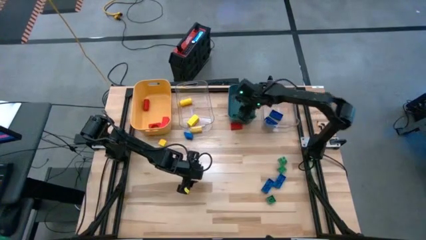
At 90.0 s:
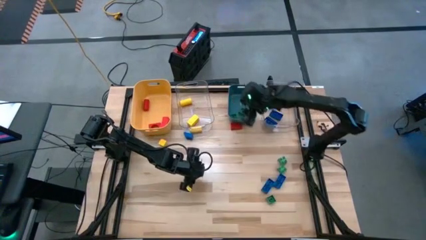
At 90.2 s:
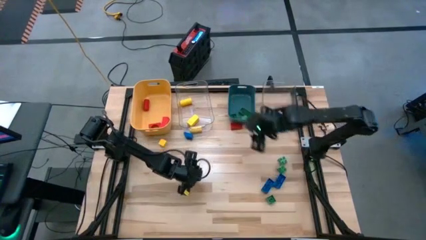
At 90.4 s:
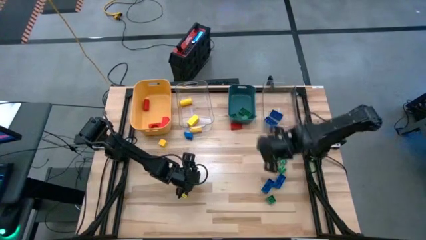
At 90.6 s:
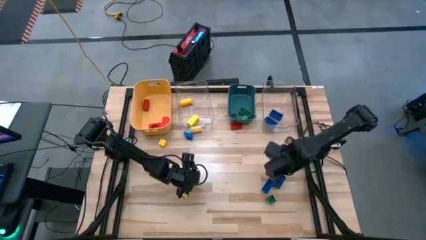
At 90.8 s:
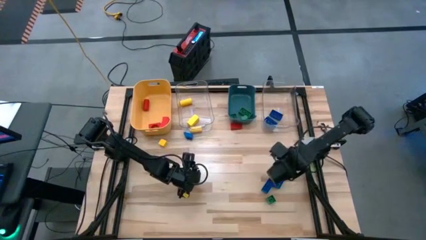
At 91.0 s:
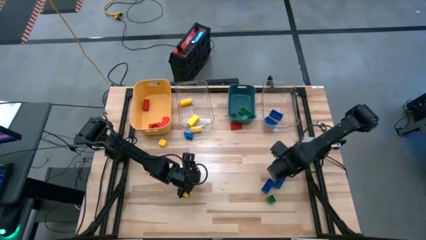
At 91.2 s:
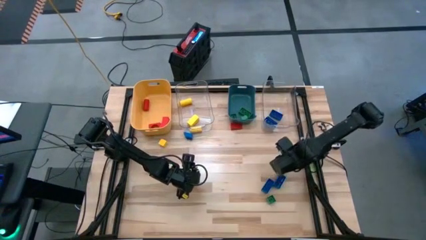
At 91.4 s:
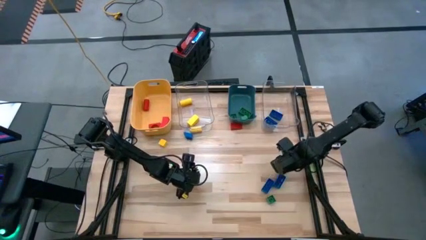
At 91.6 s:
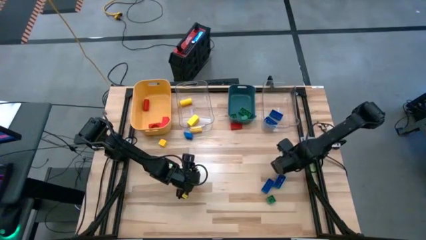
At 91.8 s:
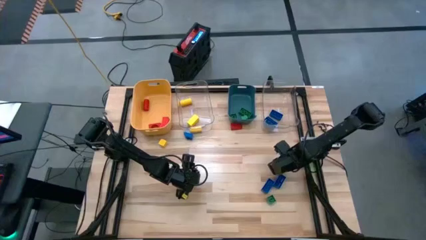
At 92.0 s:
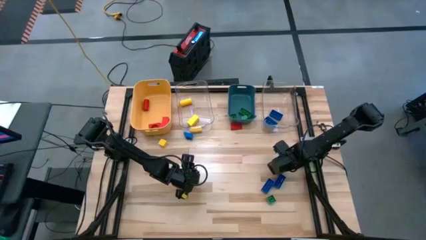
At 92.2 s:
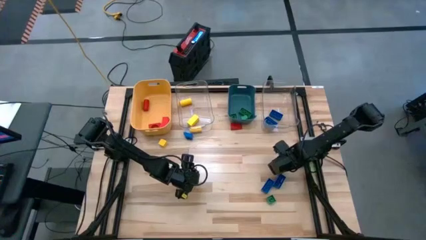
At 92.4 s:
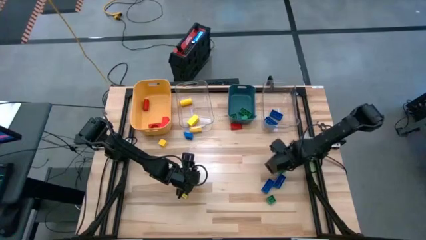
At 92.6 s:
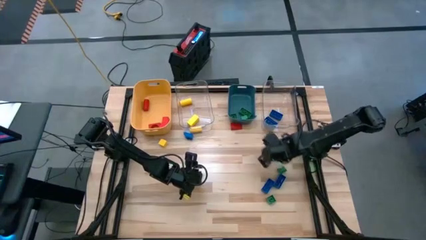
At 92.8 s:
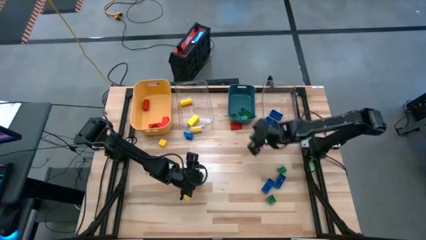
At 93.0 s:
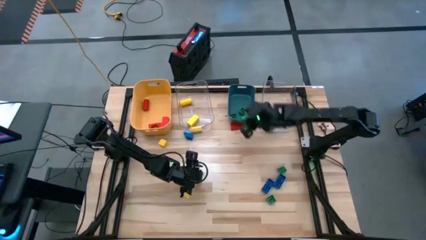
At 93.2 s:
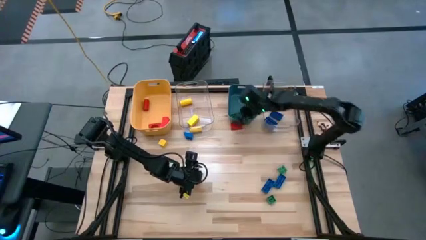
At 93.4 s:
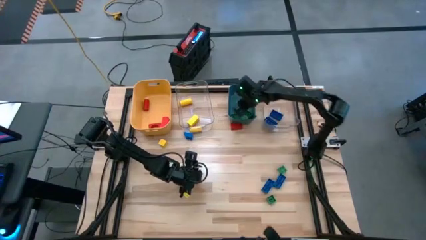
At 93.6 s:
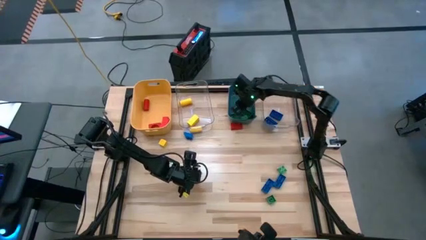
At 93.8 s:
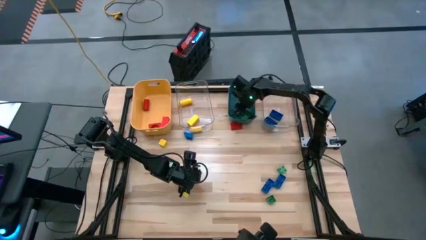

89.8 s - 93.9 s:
Task: Sort blocks
Put the green game piece into the blue bin

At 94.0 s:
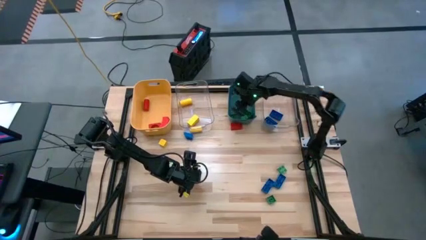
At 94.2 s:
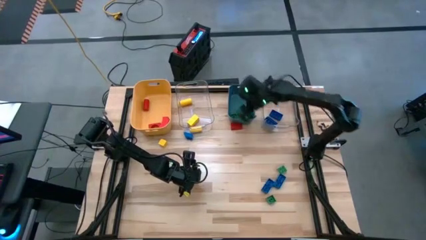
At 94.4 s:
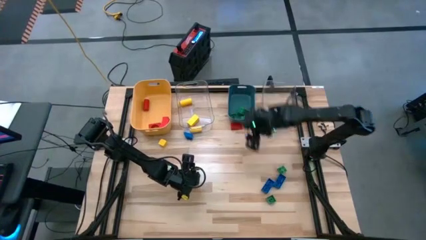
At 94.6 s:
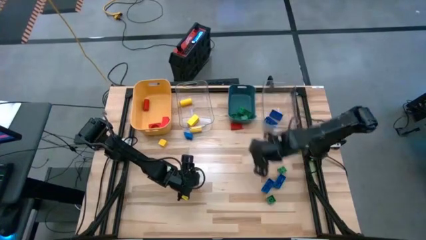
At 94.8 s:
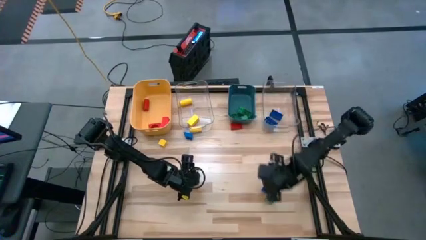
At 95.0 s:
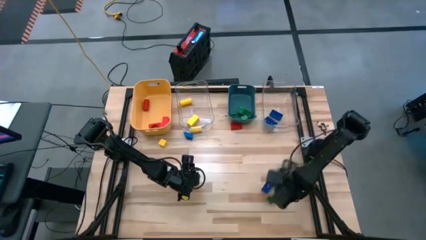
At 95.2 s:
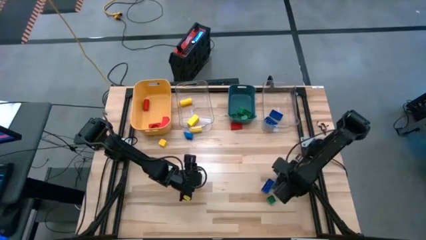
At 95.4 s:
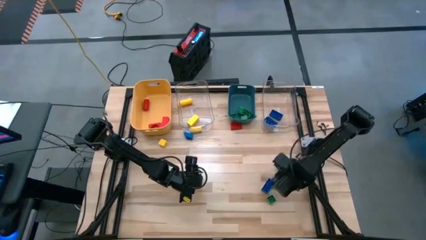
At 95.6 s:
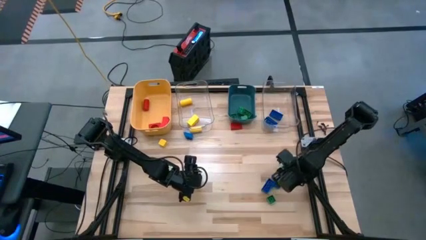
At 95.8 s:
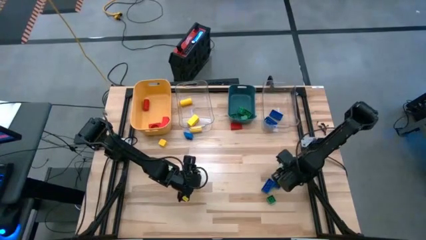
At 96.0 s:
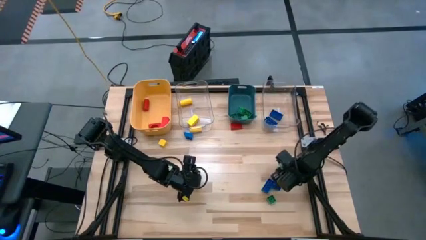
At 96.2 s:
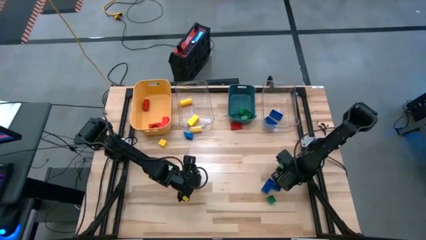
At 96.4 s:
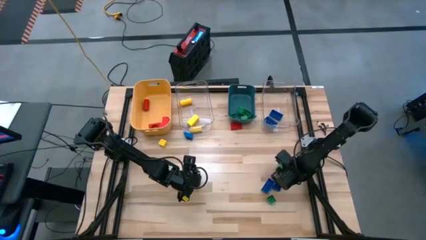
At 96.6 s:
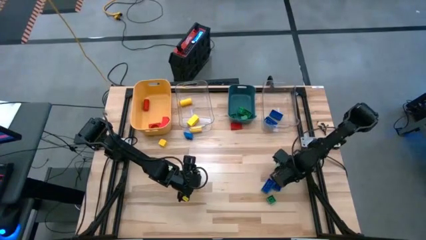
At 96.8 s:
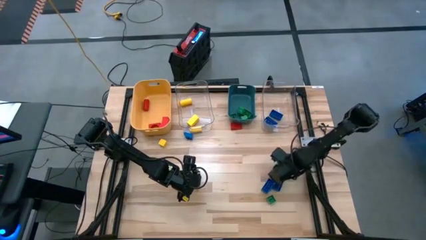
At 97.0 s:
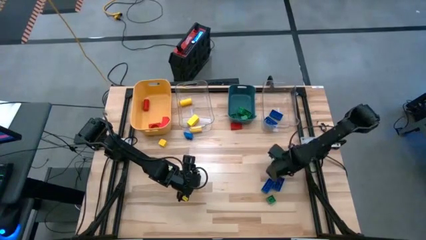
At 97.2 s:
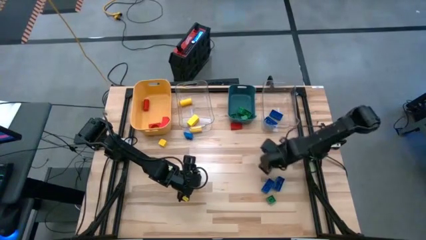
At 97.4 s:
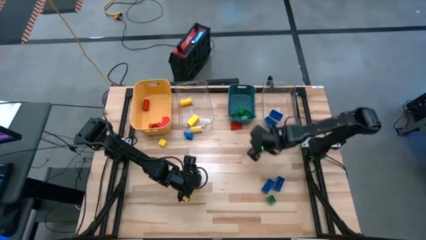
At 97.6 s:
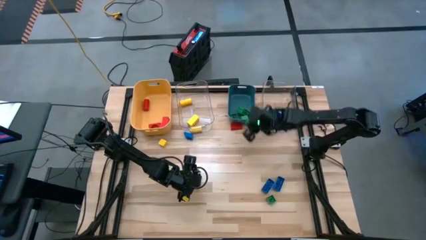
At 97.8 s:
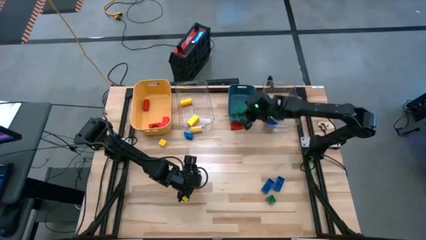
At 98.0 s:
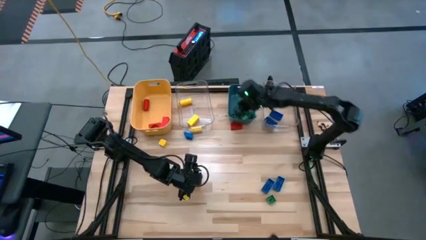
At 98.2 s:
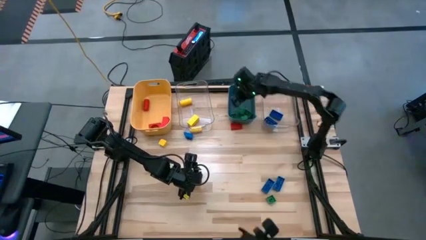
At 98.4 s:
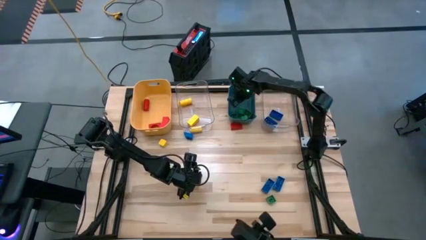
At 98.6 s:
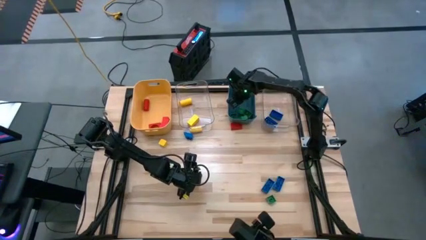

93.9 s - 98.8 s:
Put the green block into the blue bin

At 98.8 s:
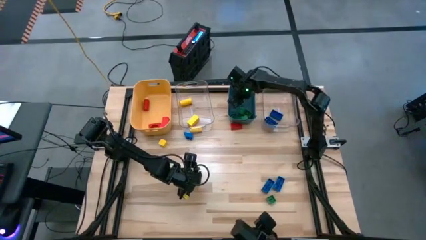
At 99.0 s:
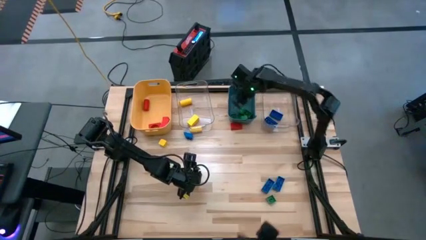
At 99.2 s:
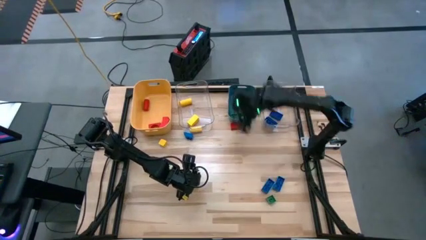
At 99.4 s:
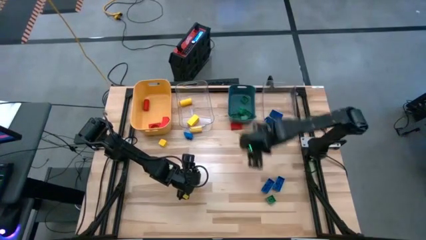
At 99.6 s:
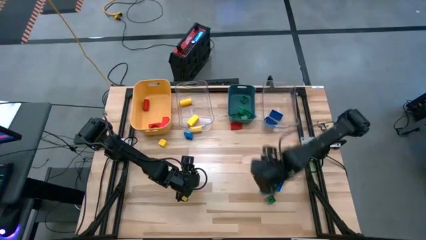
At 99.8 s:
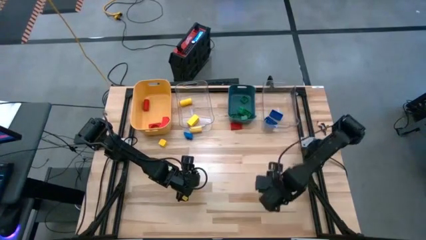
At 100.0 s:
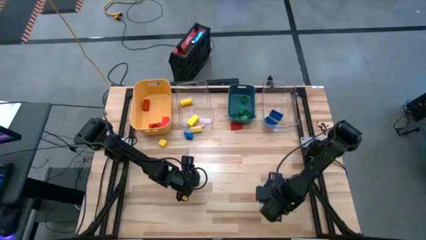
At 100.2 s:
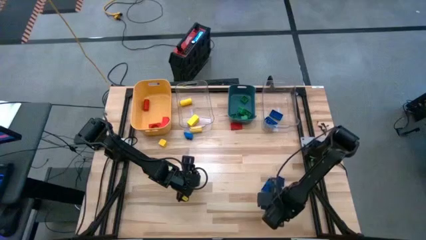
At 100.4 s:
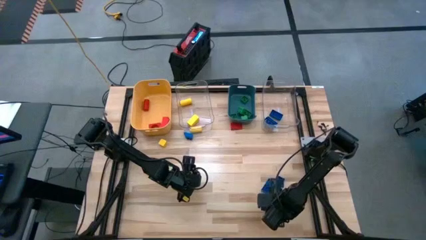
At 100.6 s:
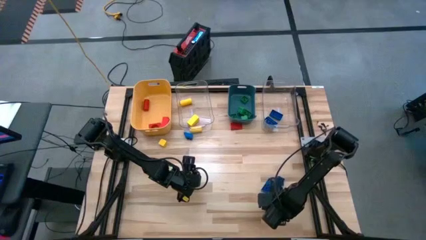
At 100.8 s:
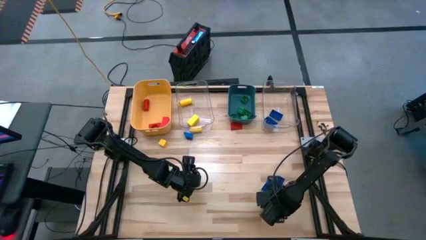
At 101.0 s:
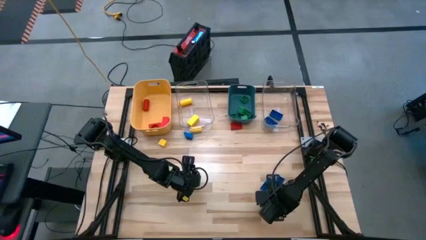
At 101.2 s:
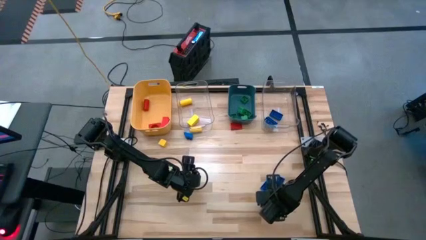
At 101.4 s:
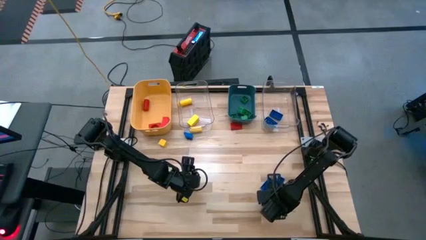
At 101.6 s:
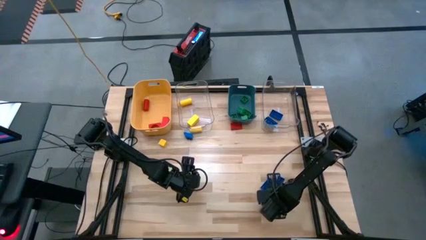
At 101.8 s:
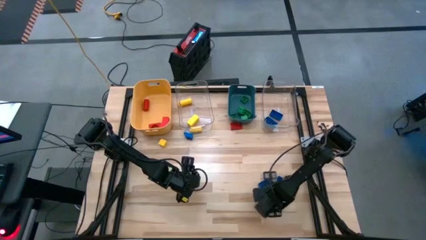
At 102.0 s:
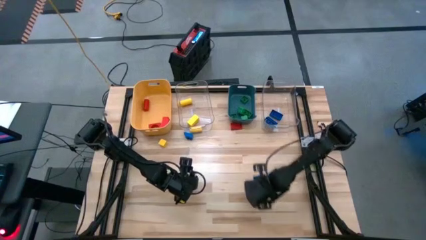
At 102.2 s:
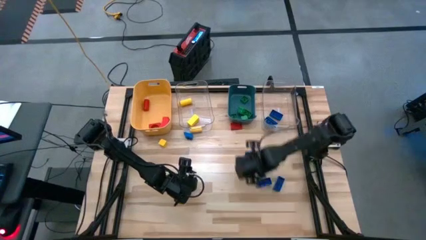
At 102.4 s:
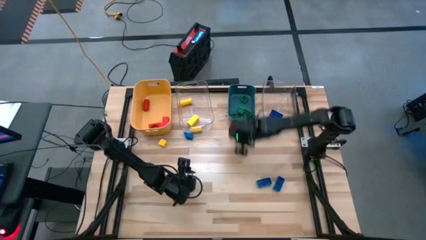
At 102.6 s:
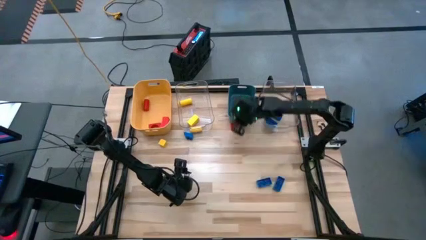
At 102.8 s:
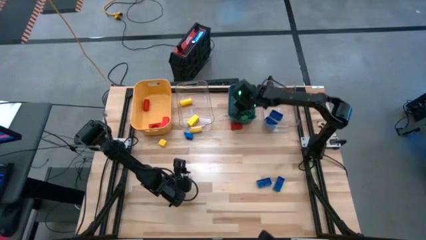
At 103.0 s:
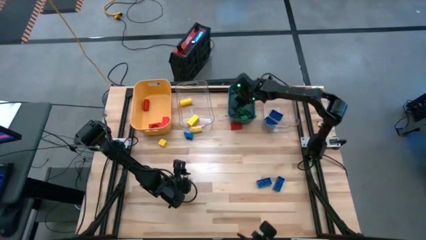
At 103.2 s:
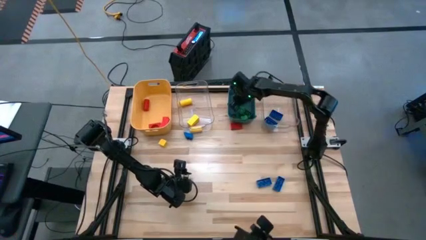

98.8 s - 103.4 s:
Put the green game piece into the blue bin

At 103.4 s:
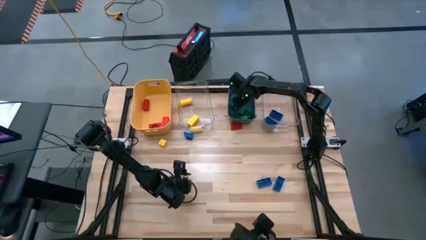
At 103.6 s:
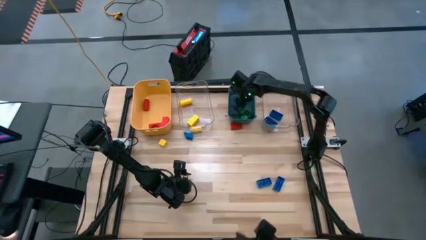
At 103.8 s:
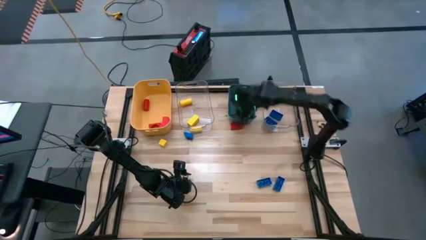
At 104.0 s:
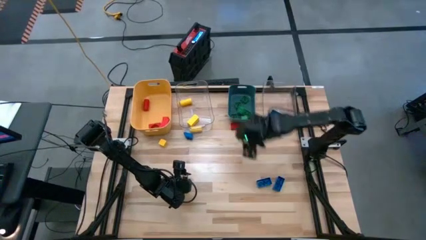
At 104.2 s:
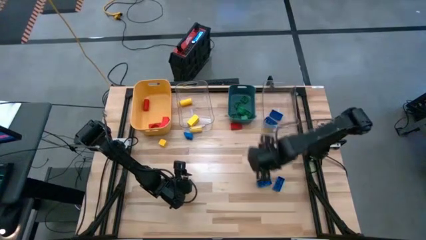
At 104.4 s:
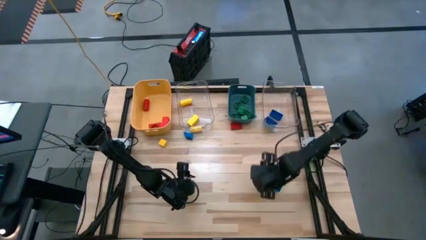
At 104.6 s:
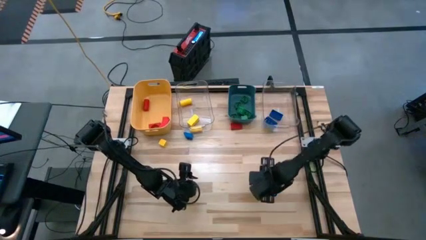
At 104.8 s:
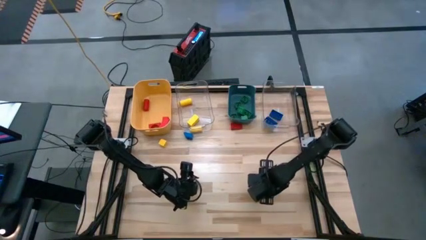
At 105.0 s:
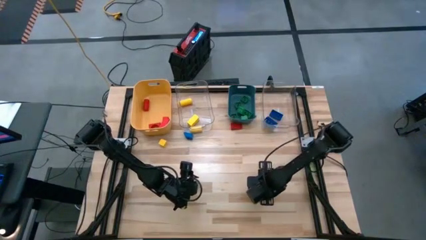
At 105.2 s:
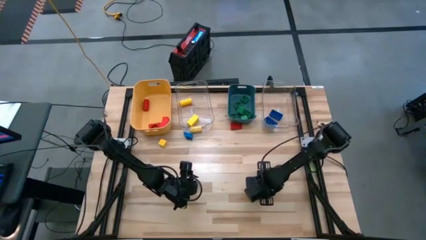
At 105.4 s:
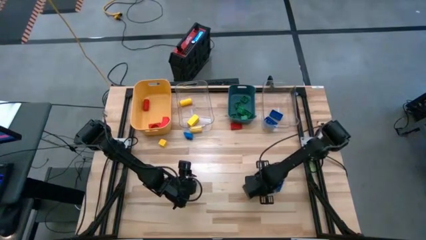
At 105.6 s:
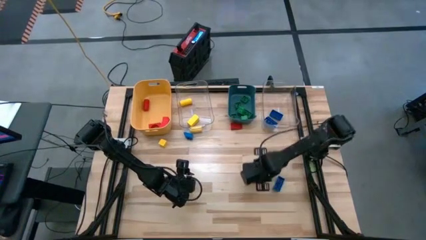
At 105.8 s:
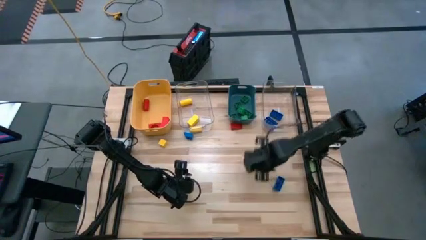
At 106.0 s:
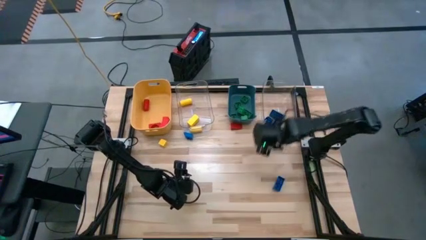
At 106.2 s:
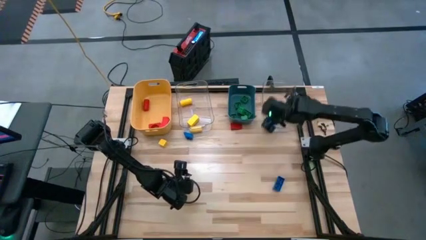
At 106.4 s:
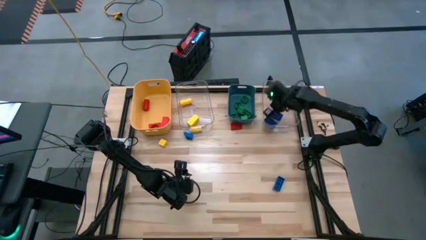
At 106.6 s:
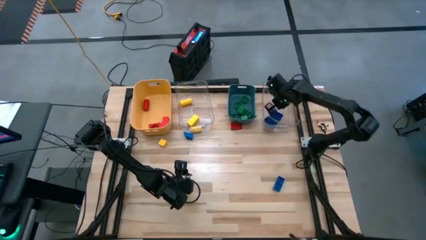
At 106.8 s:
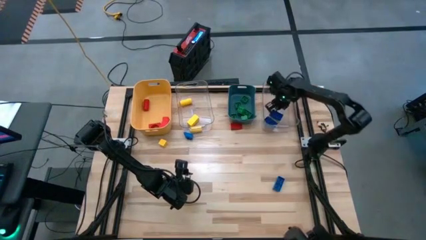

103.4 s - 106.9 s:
Put the blue game piece into the right transparent bin
